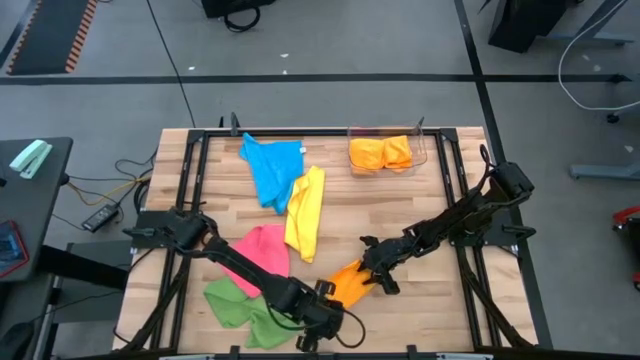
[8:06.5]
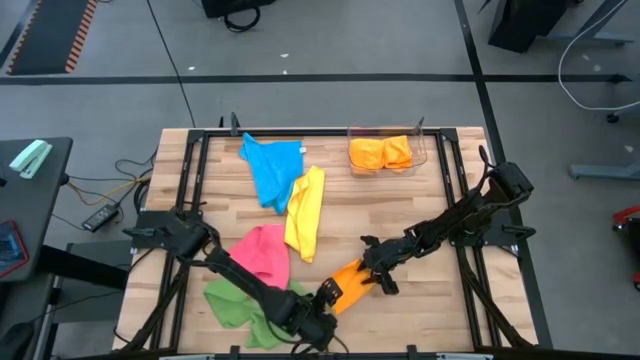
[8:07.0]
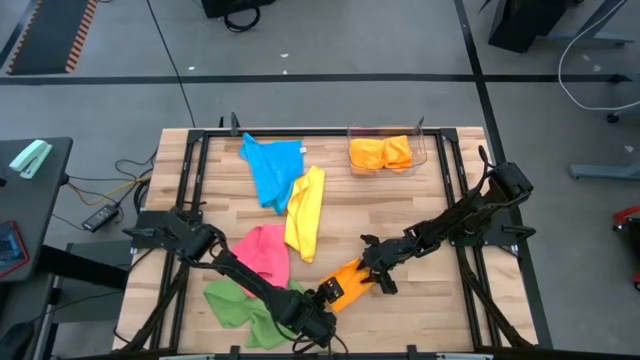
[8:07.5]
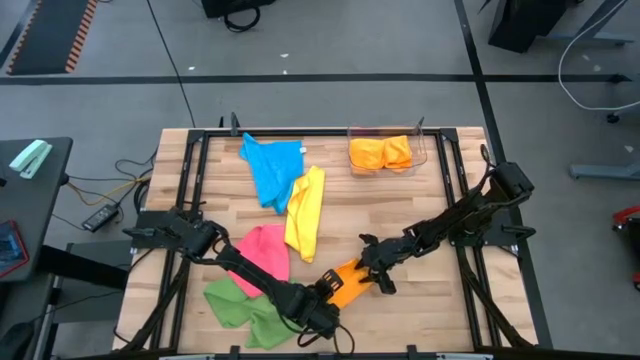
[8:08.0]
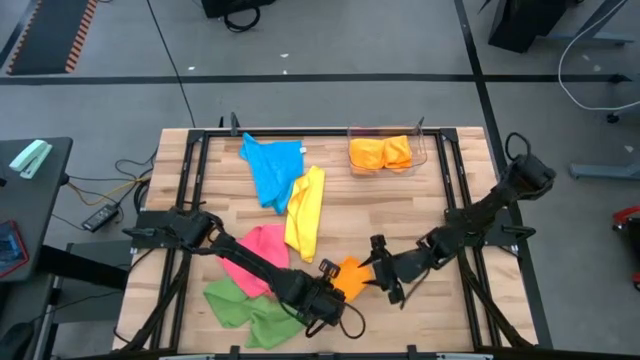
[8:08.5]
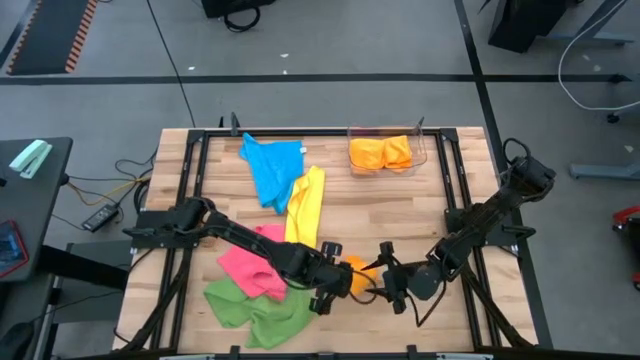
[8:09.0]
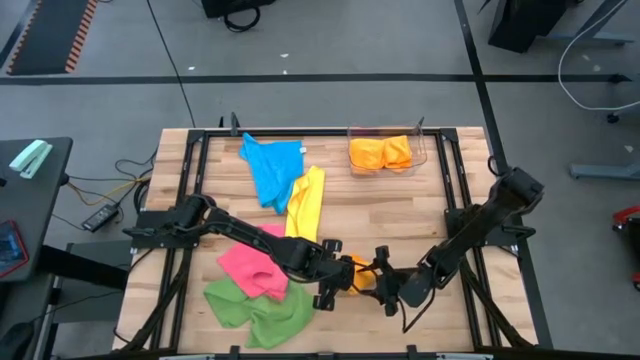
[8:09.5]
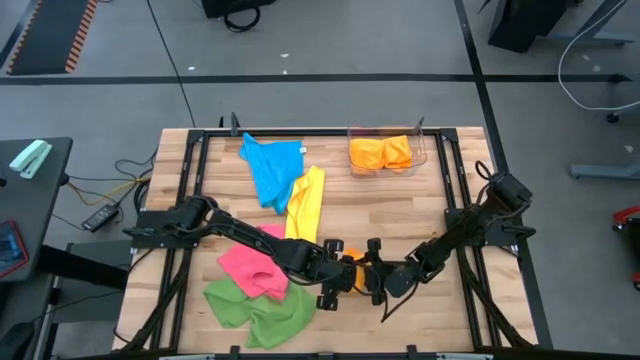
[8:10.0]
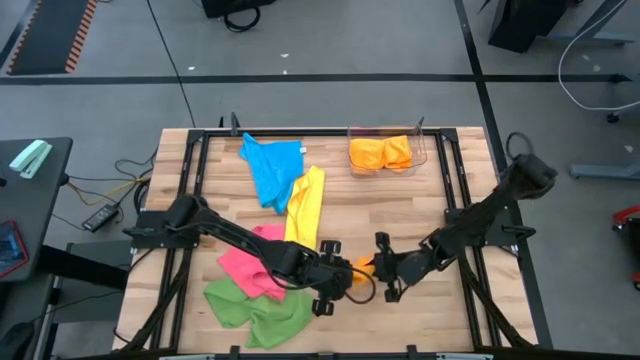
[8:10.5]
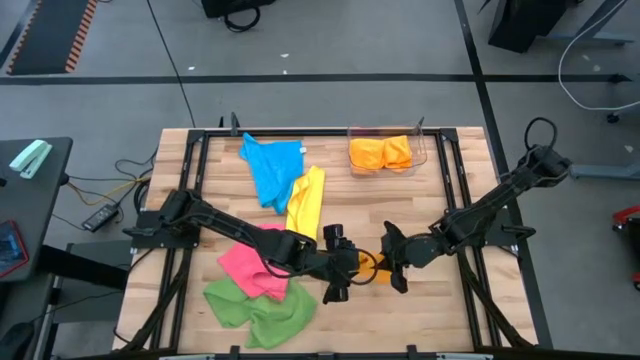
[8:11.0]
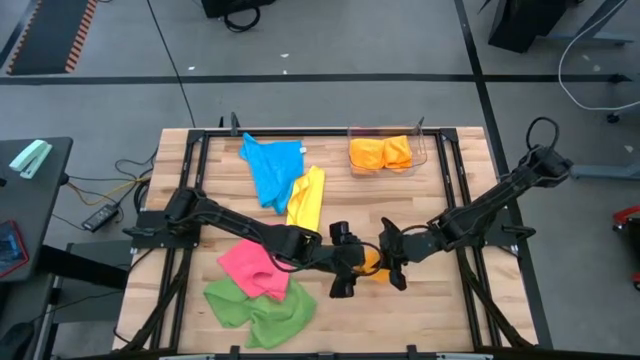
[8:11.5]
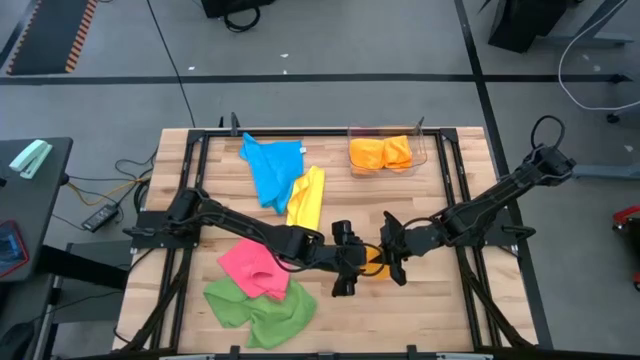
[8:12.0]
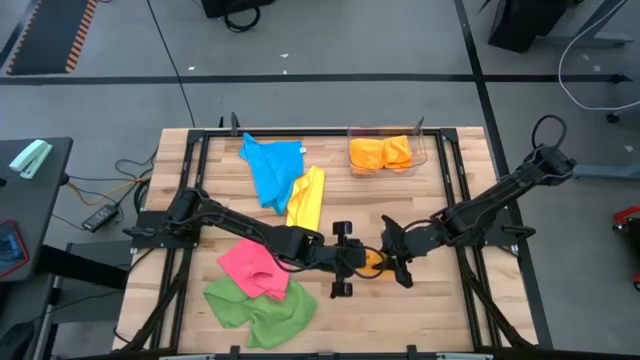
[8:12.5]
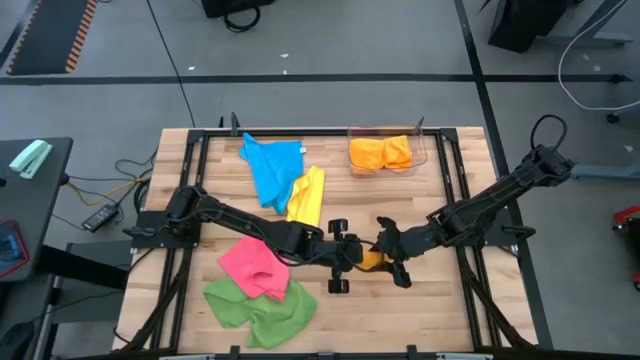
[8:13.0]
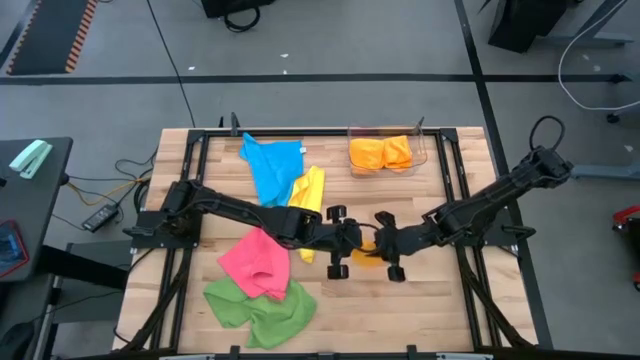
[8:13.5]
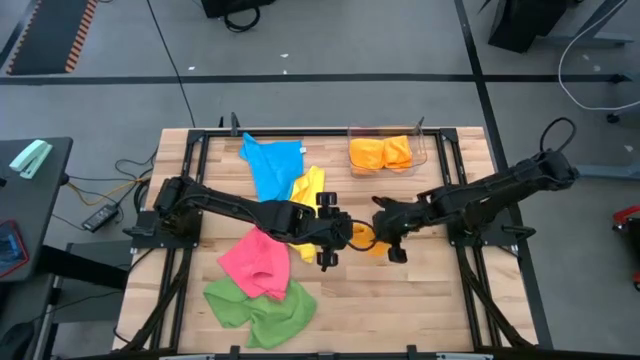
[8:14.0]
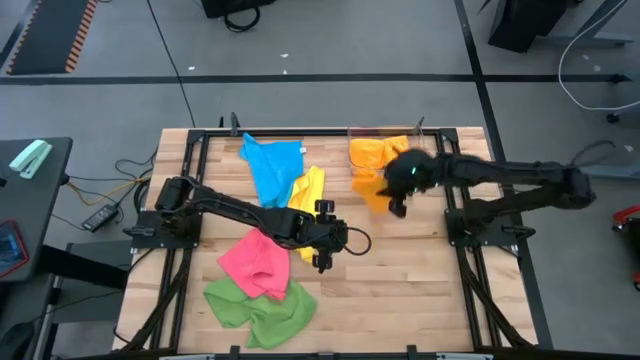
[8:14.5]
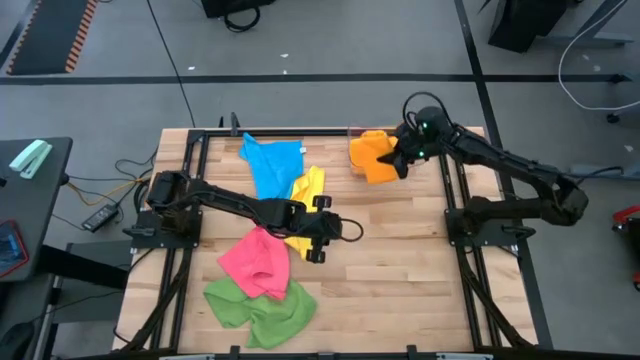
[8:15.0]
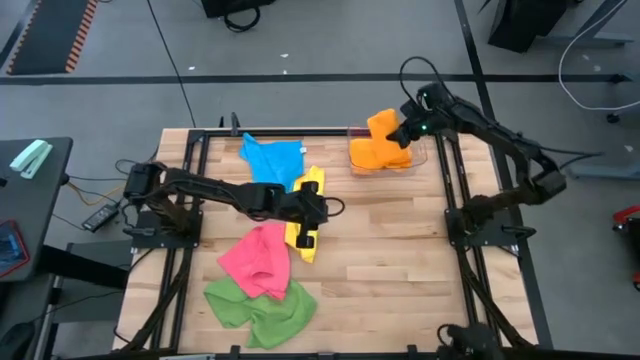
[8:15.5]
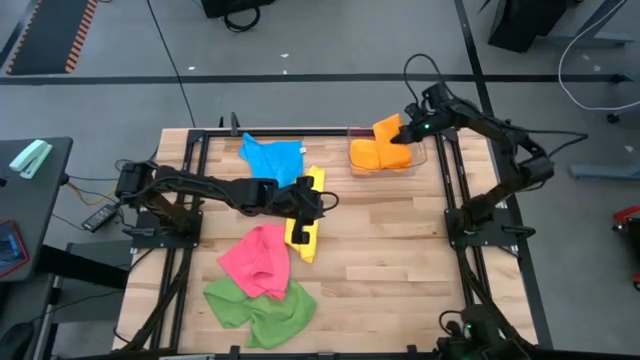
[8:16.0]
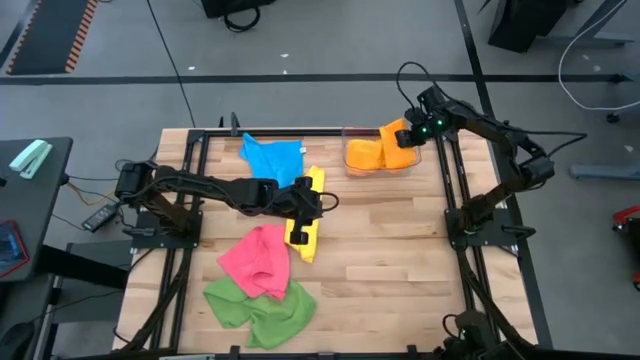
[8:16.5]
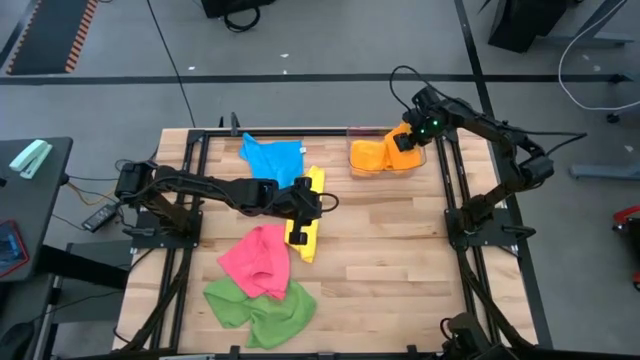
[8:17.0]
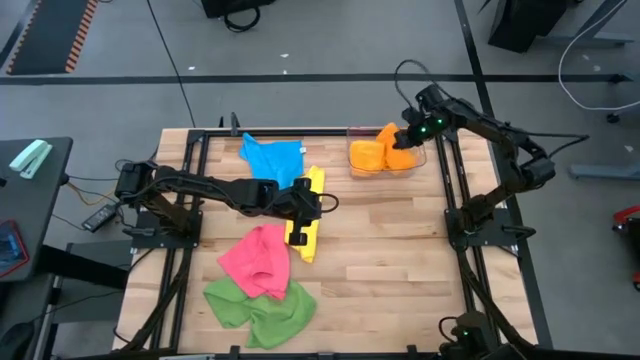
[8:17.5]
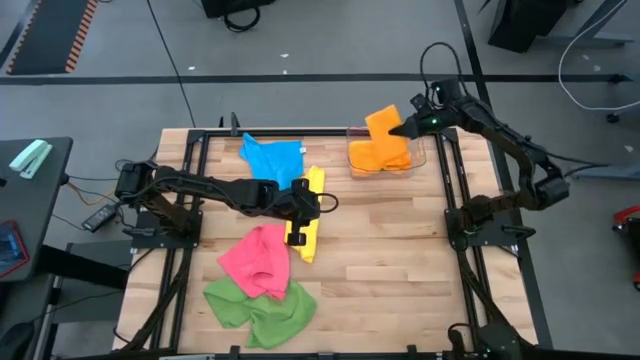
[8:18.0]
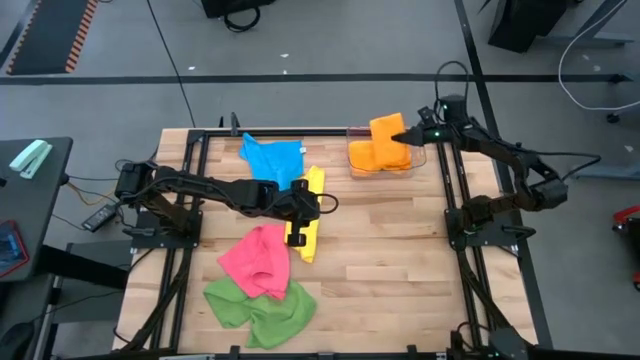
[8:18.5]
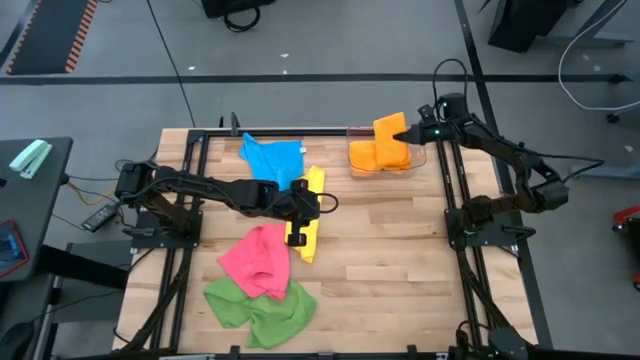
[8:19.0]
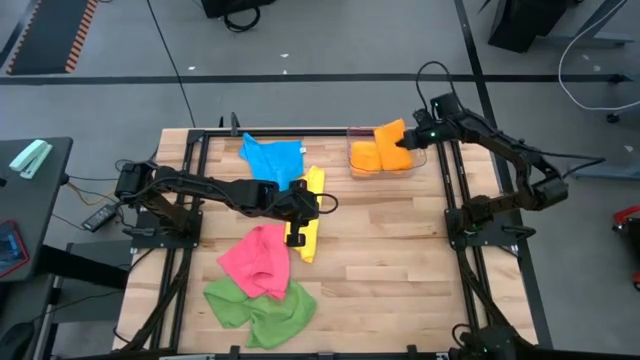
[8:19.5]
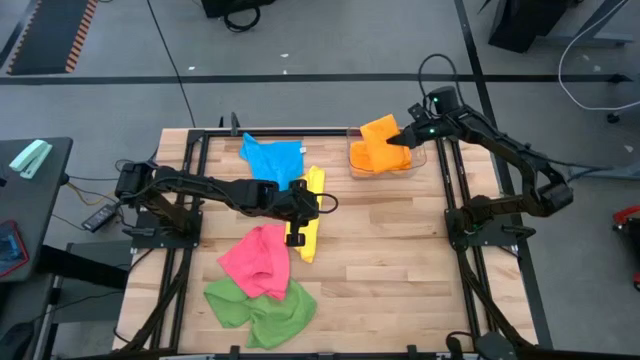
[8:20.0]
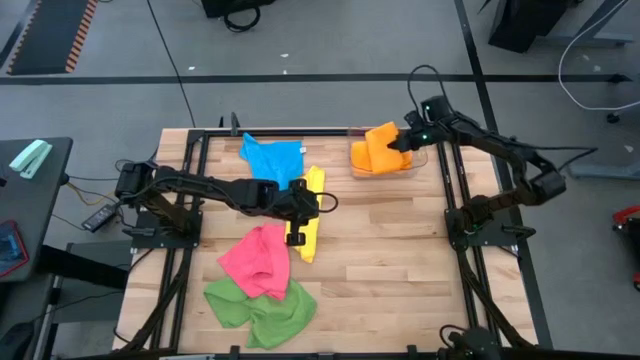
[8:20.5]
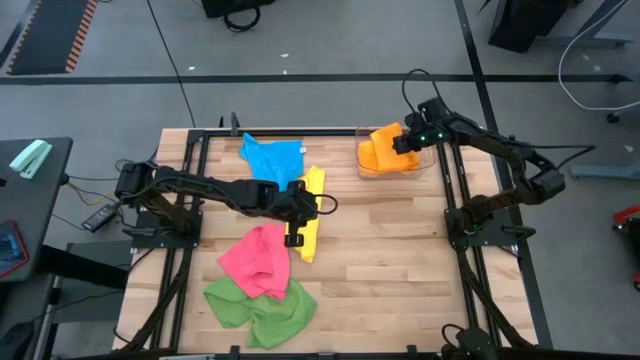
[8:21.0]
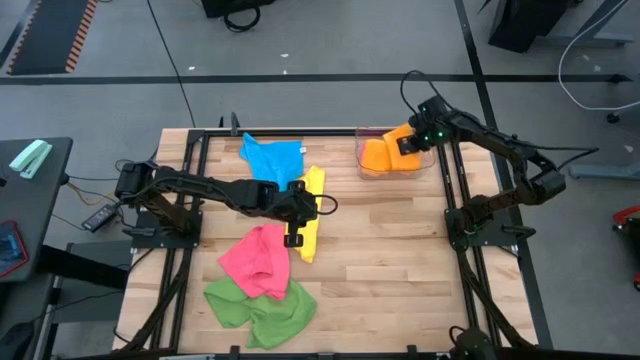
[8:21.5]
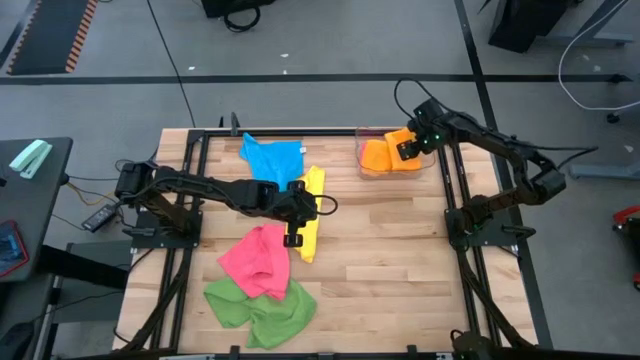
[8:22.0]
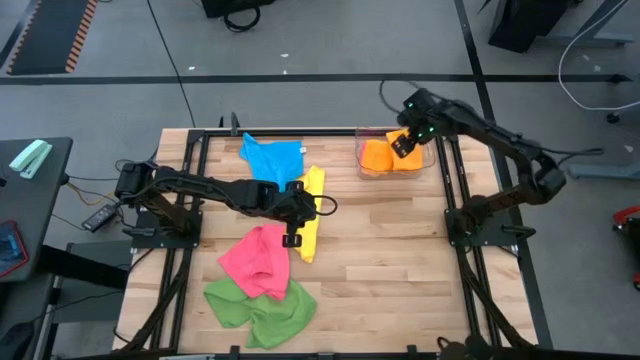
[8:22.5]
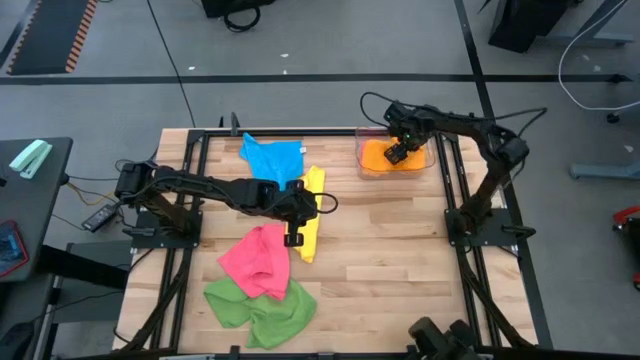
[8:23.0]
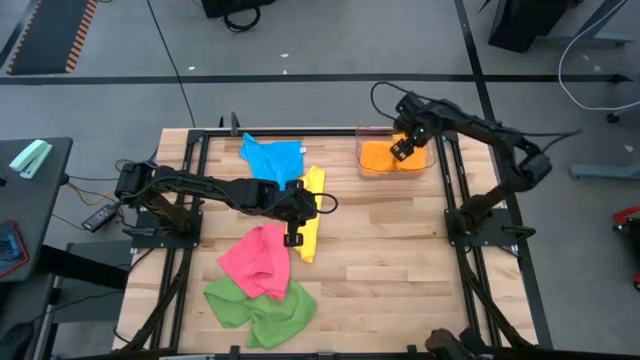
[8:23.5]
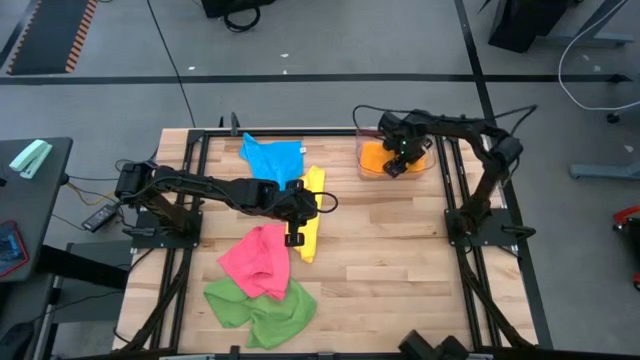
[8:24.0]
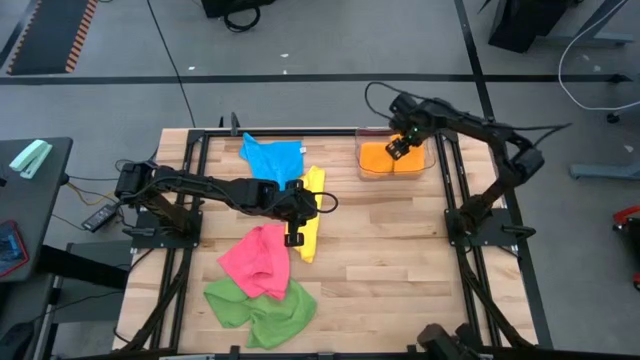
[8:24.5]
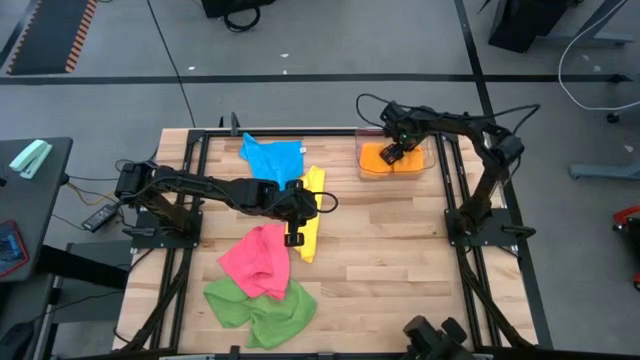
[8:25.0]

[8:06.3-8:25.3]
Task: Fold microfiber towels
Stack the folded orange microfiber cloth on top of the other folded orange microfiber cloth
